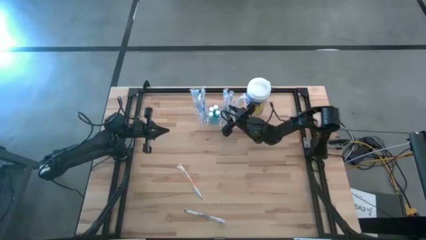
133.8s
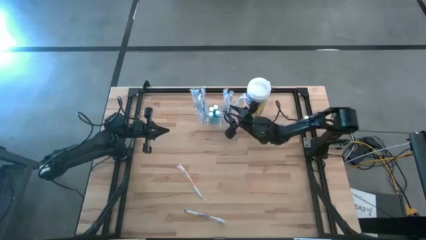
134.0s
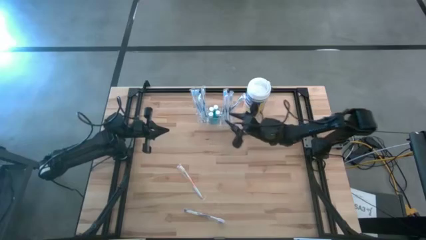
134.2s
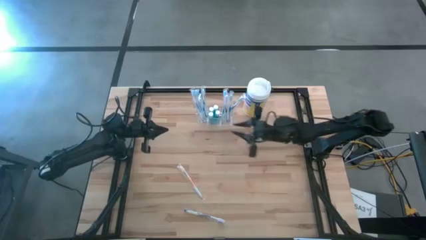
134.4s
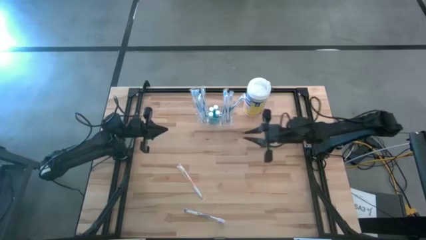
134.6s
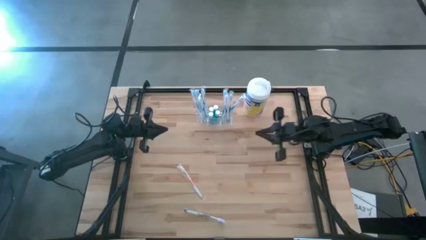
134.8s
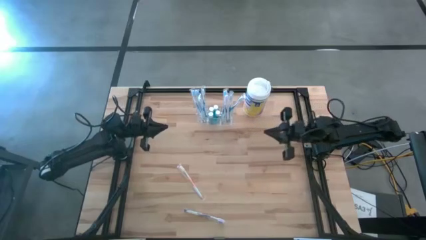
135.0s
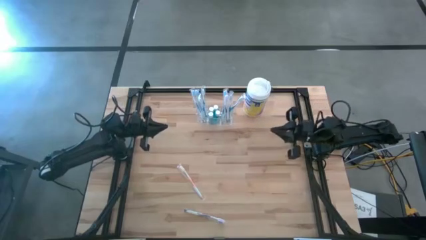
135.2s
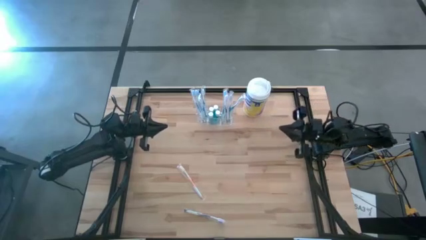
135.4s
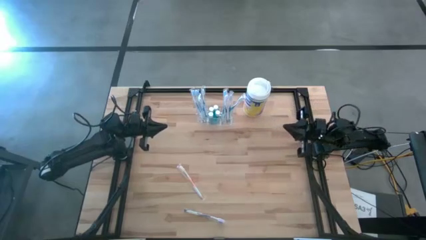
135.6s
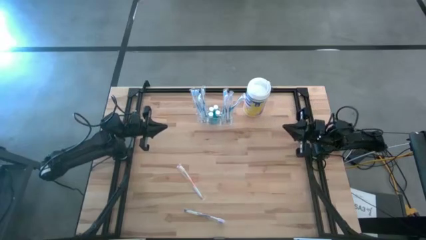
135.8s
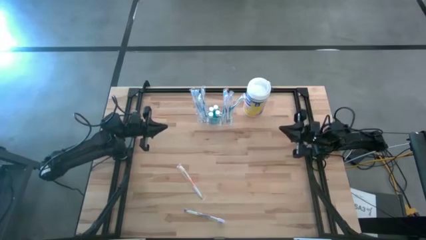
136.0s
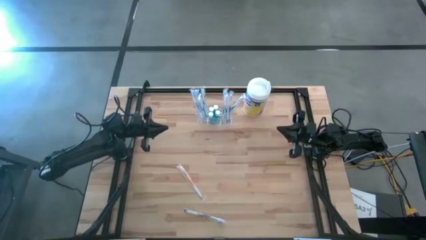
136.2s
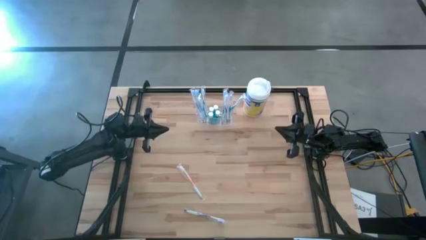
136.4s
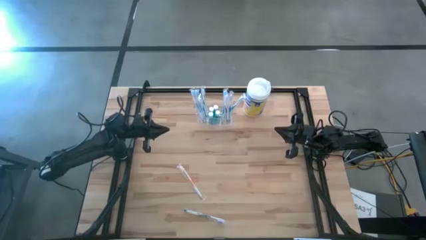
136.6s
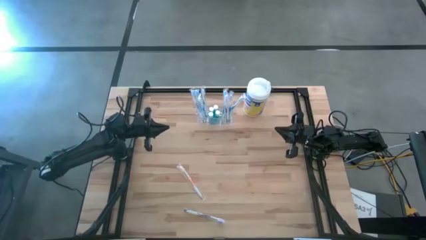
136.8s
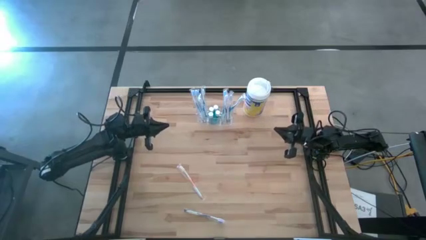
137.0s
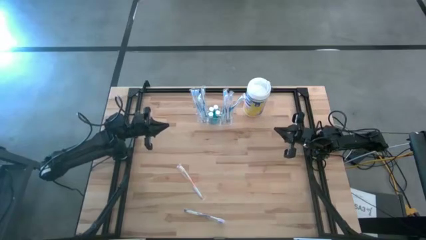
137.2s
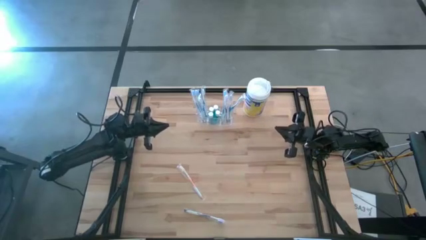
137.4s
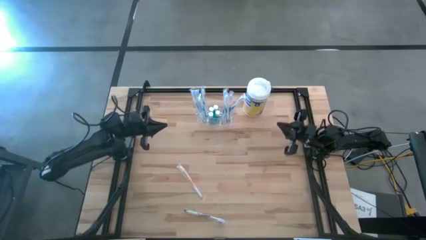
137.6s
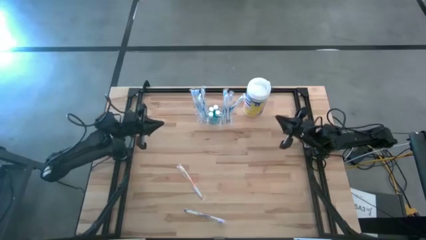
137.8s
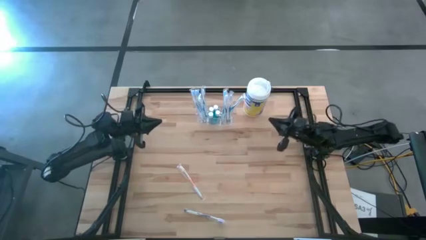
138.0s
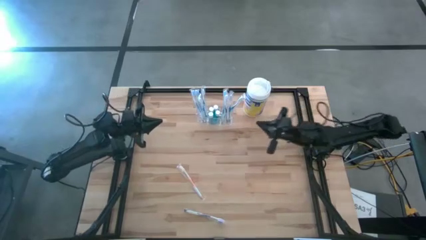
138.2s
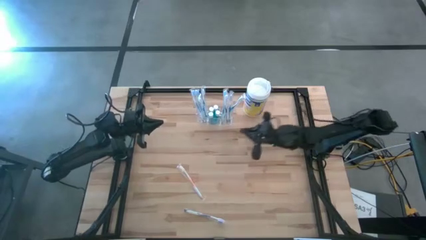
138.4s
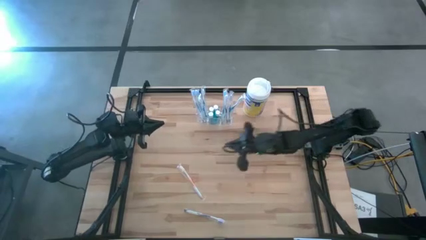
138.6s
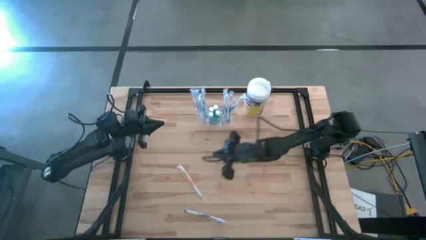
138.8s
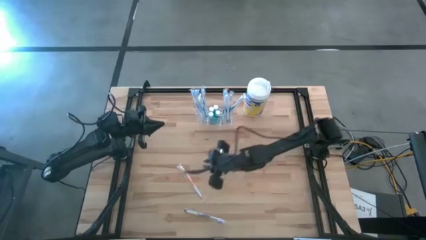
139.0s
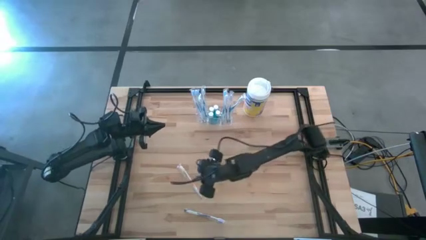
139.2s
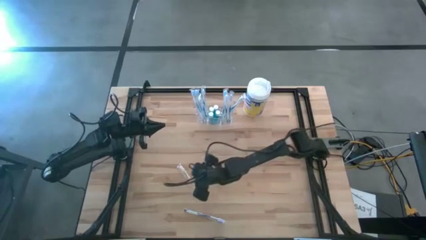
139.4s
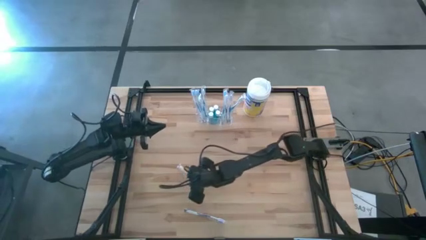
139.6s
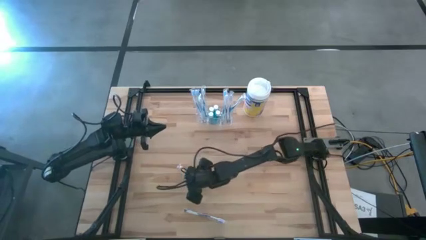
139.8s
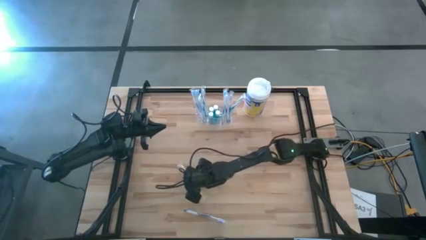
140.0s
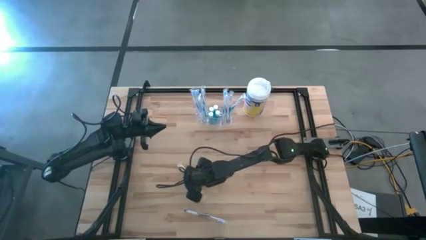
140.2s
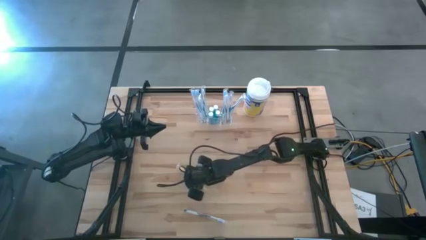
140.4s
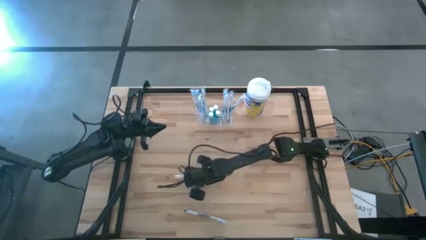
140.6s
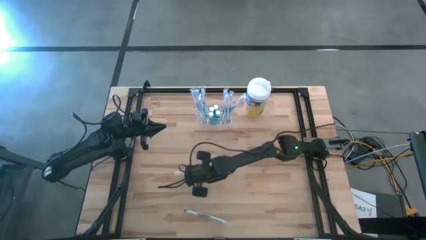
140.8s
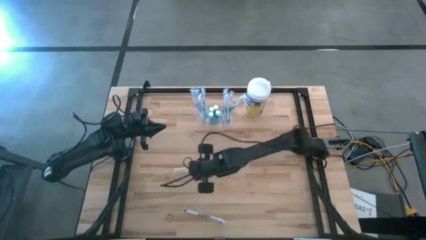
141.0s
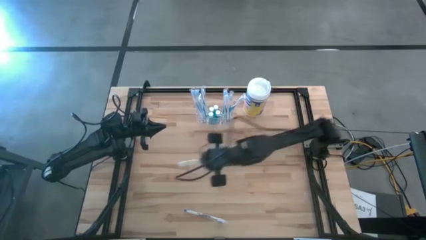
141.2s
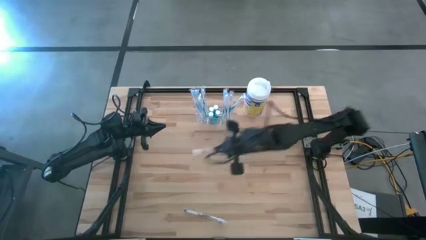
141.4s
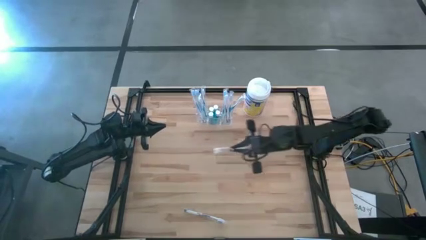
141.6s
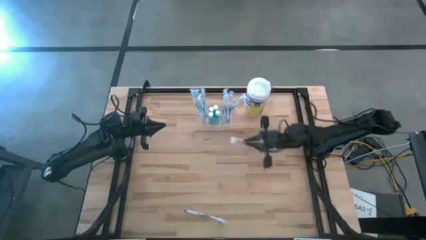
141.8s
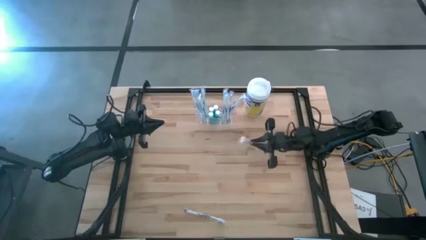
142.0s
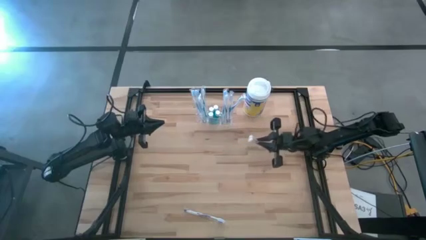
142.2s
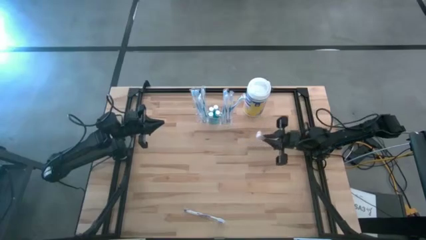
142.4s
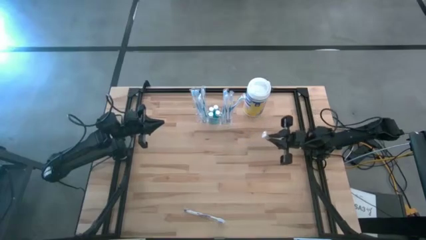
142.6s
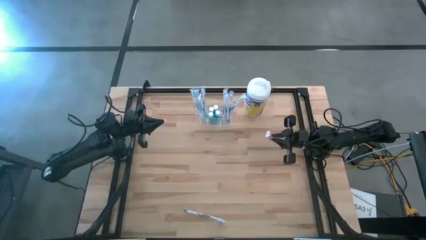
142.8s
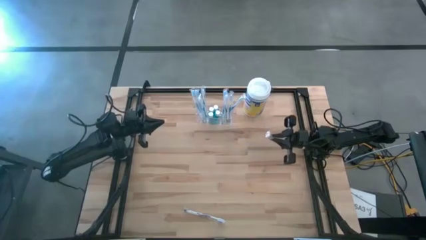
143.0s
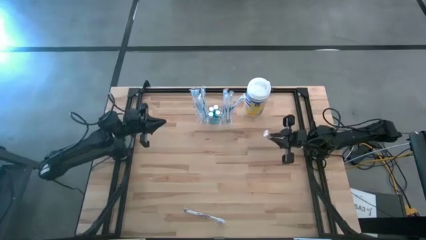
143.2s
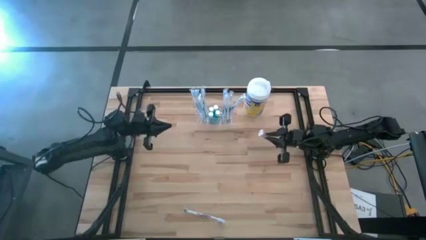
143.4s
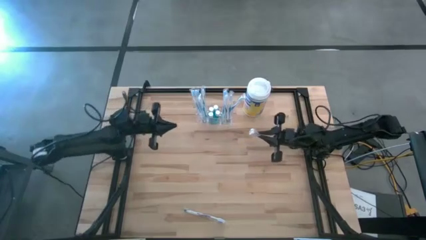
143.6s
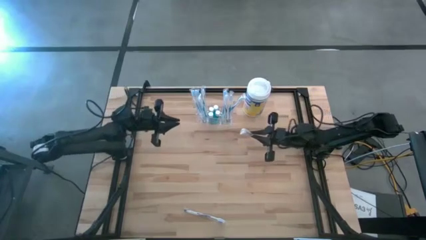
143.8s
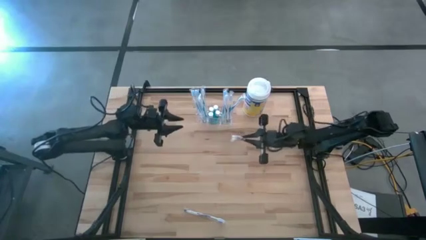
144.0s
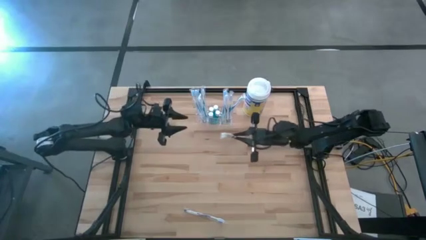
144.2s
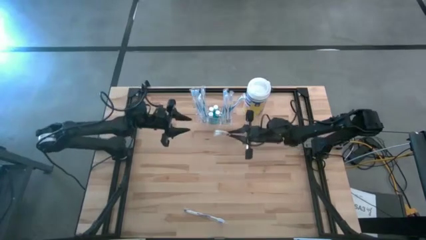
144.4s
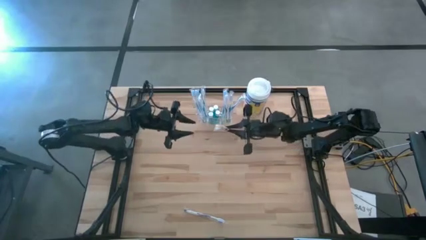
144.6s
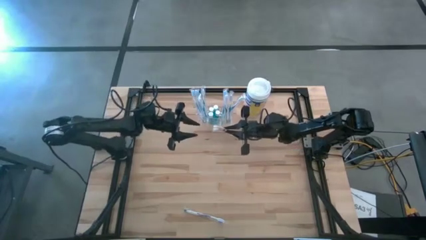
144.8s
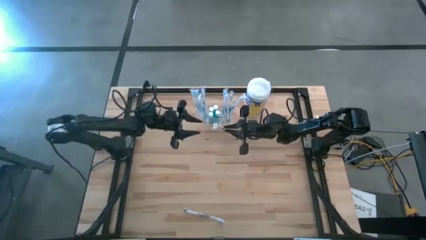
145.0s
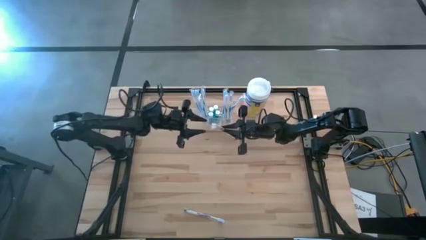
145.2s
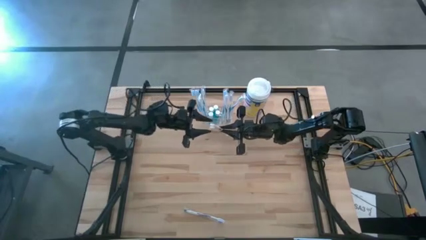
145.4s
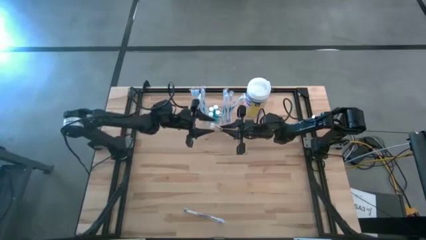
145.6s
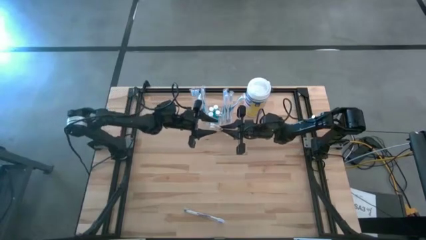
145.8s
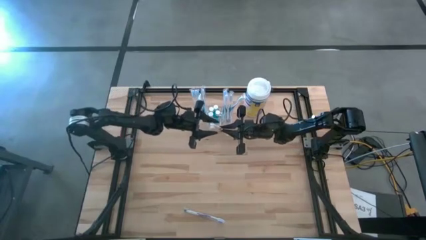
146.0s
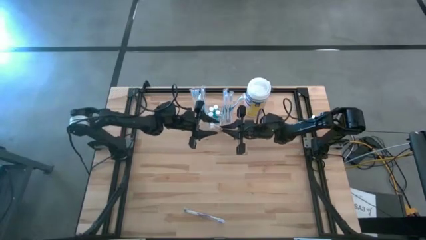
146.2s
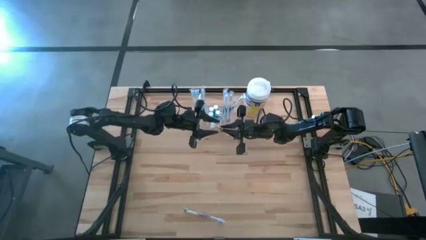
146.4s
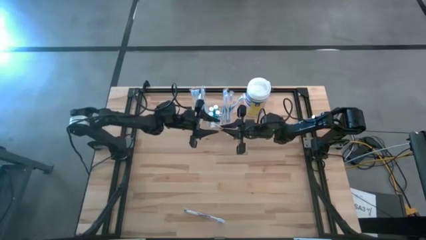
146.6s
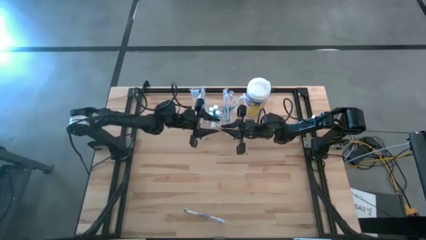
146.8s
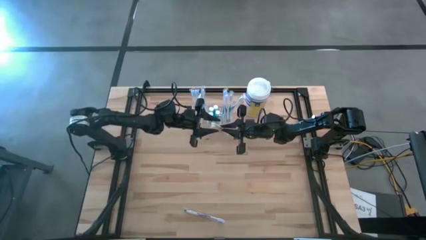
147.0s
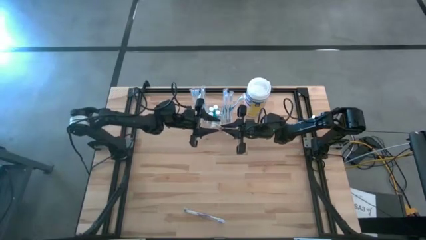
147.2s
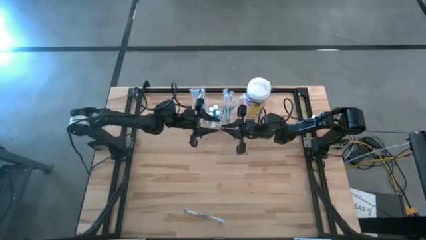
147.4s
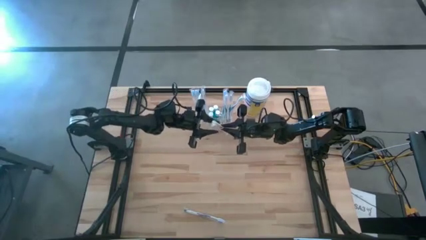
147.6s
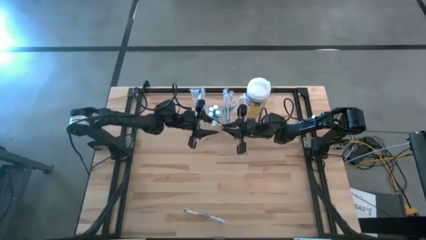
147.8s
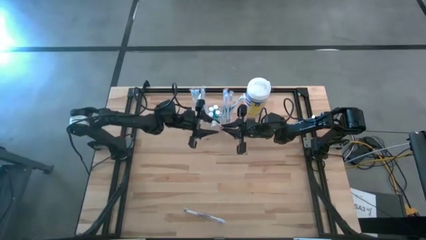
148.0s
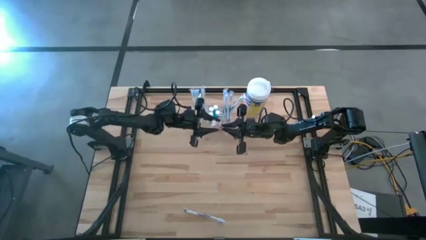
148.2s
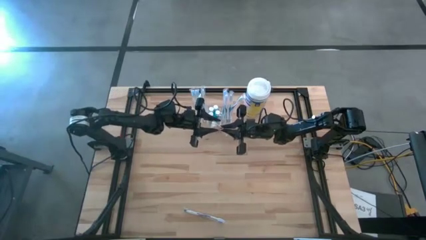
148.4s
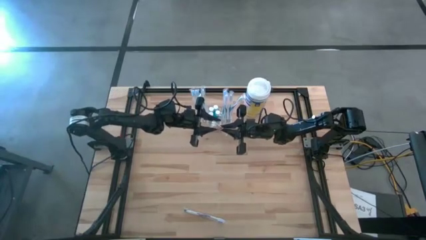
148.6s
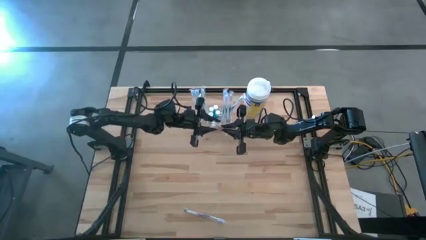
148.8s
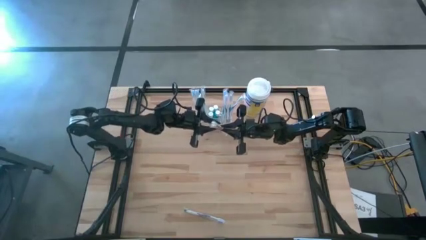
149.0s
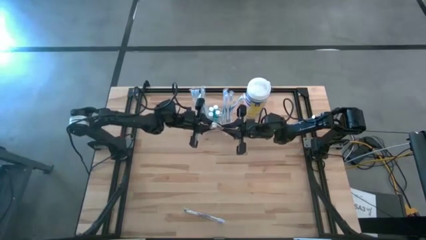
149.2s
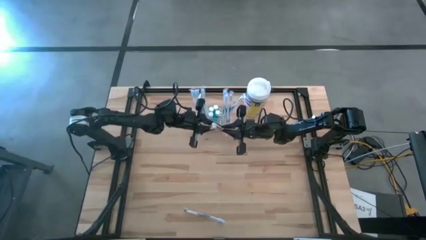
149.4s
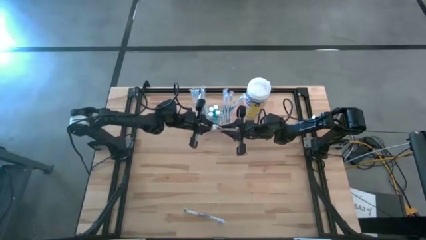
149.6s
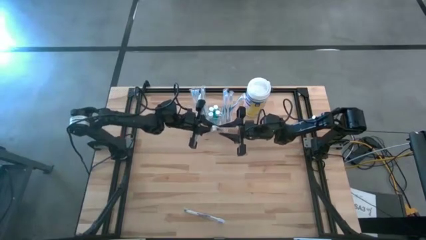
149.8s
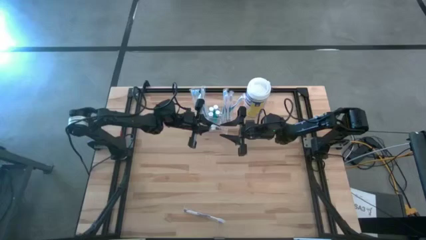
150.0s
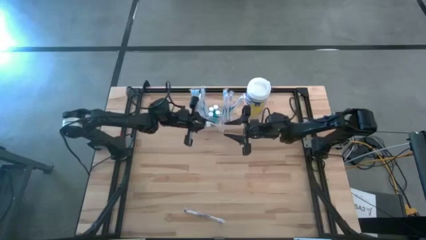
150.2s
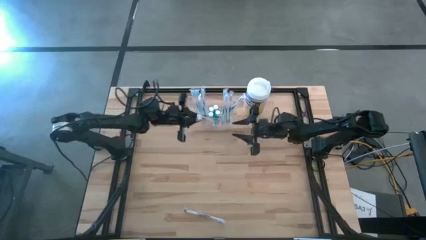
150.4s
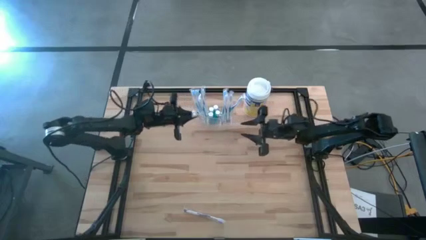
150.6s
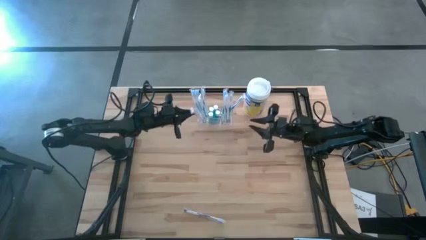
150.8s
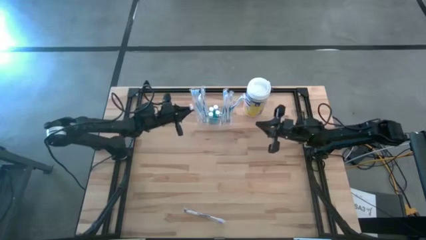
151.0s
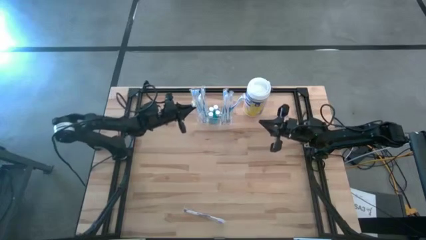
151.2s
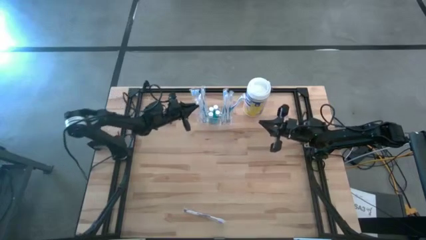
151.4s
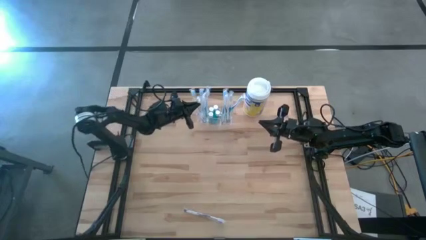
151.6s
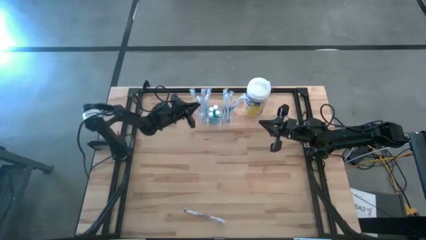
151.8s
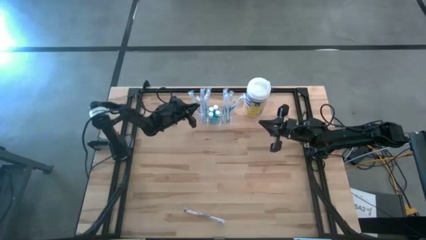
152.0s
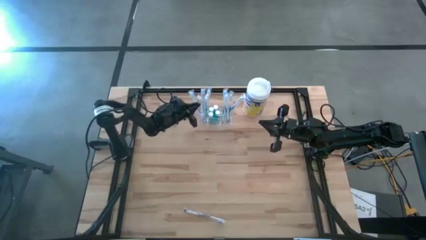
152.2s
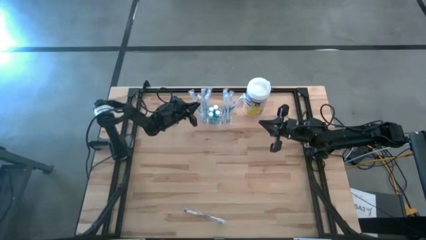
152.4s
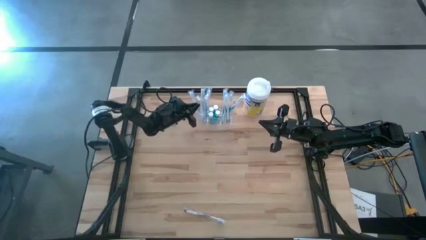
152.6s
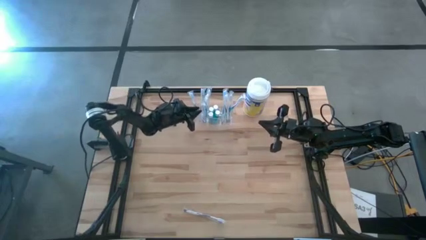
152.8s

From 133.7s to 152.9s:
Task: Pick & Place toothbrushing station
Put the orange toothbrush into the transparent toothbrush holder
